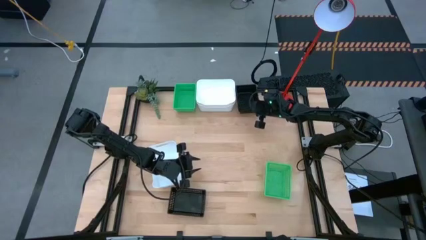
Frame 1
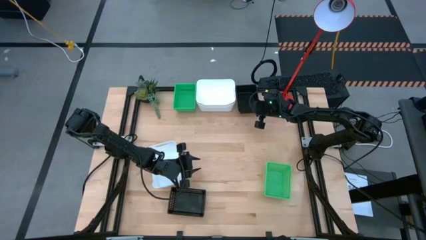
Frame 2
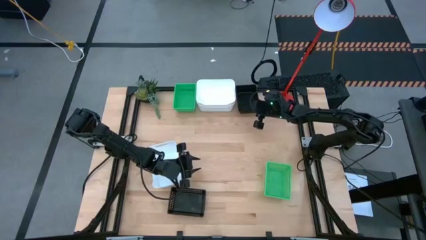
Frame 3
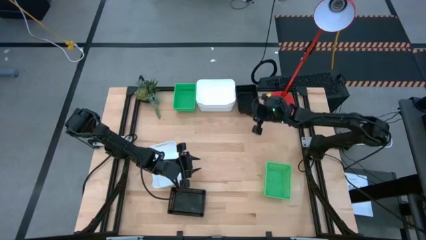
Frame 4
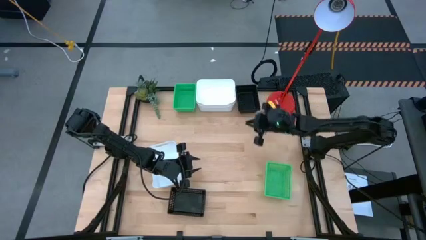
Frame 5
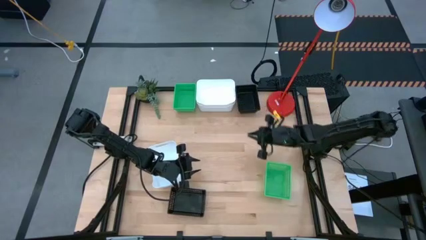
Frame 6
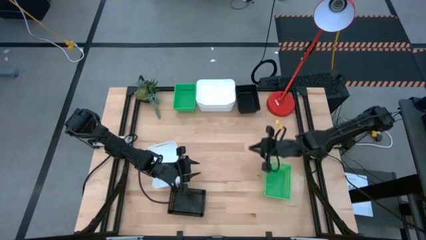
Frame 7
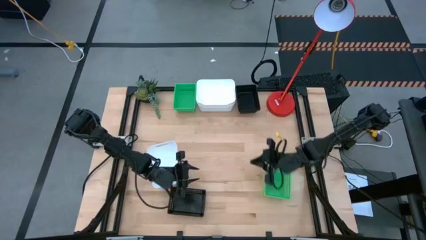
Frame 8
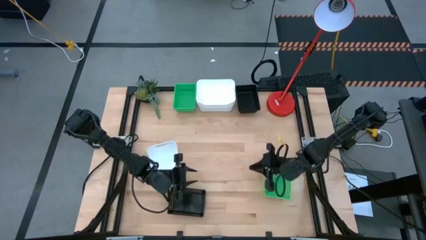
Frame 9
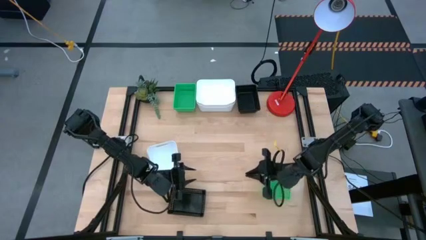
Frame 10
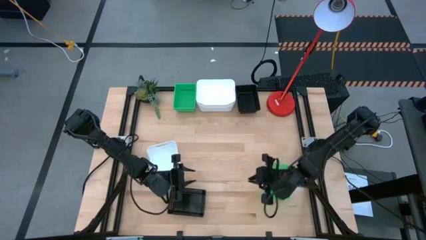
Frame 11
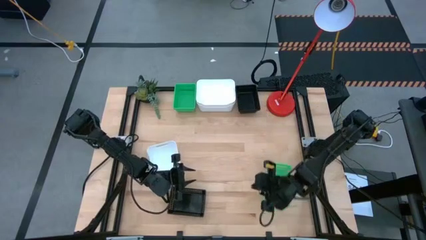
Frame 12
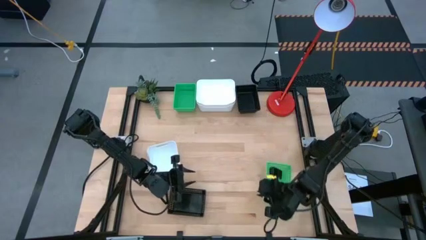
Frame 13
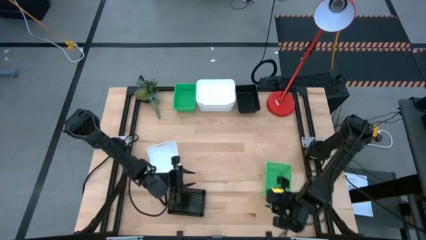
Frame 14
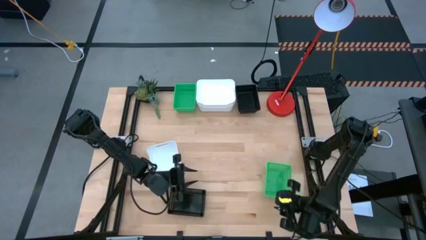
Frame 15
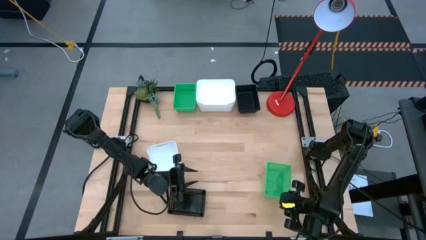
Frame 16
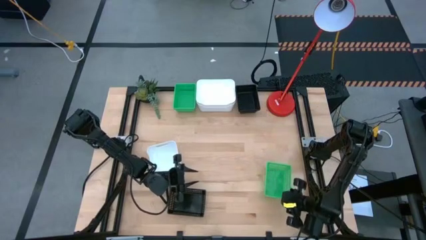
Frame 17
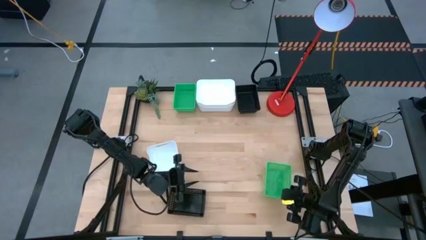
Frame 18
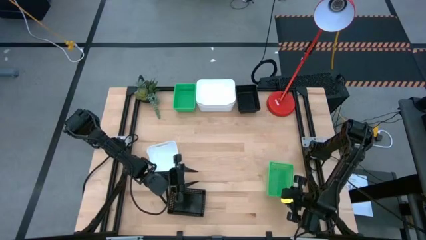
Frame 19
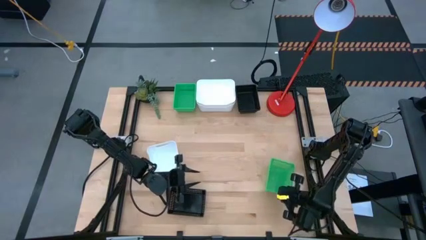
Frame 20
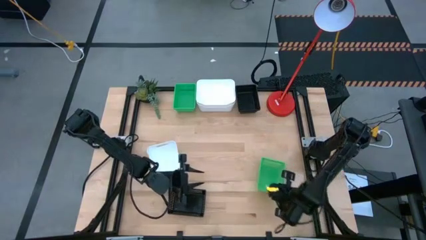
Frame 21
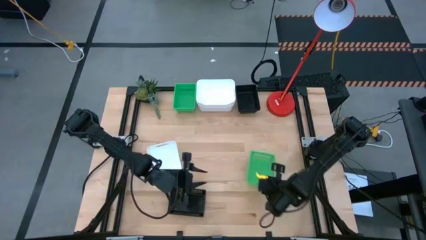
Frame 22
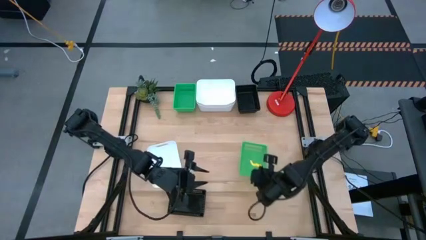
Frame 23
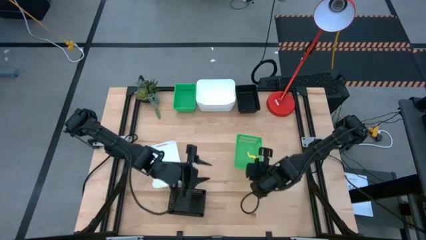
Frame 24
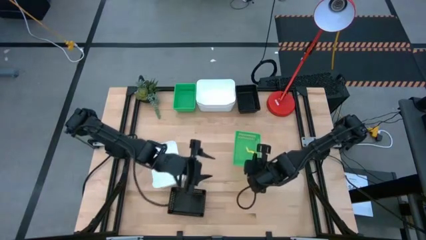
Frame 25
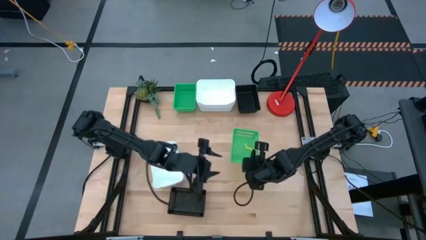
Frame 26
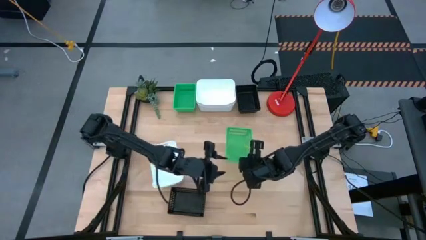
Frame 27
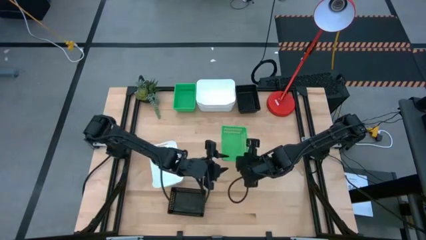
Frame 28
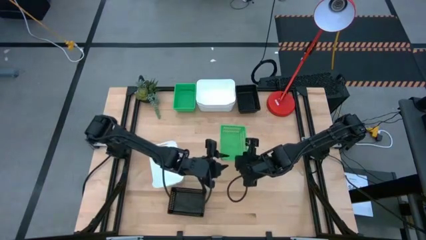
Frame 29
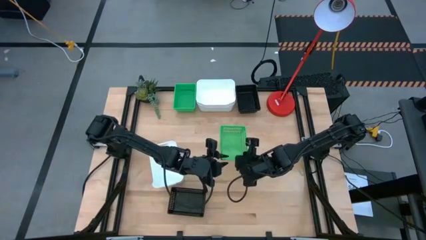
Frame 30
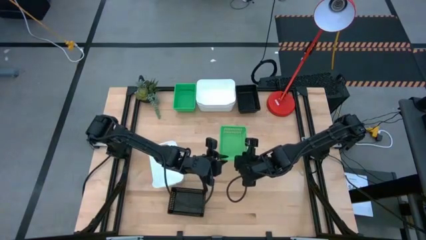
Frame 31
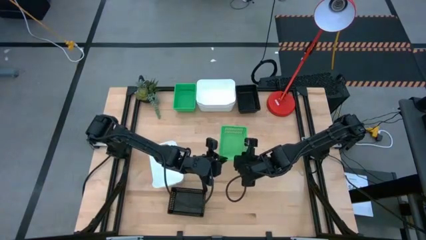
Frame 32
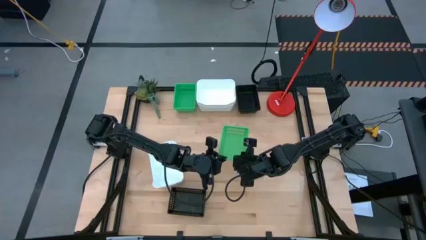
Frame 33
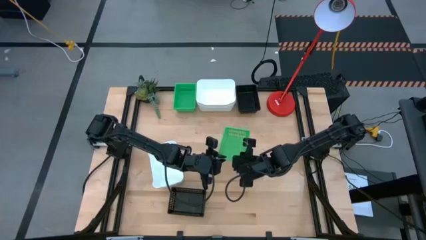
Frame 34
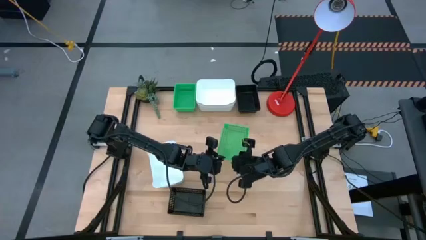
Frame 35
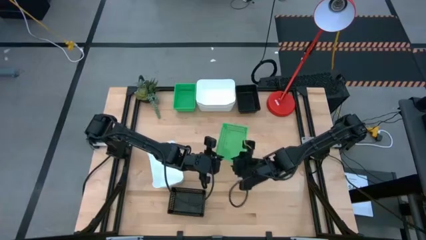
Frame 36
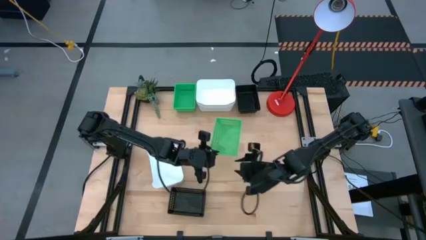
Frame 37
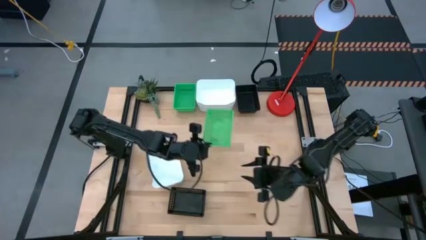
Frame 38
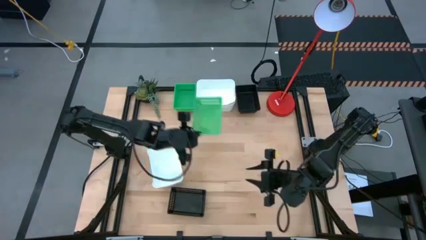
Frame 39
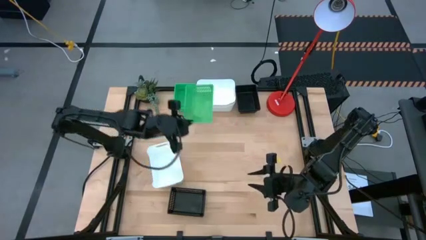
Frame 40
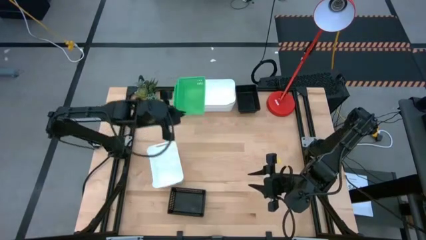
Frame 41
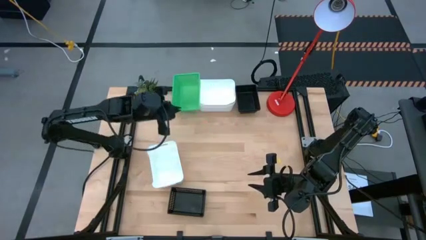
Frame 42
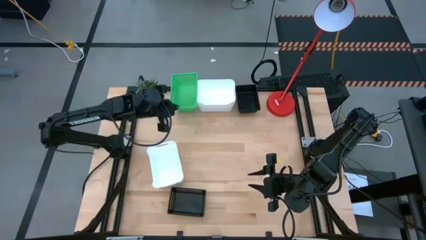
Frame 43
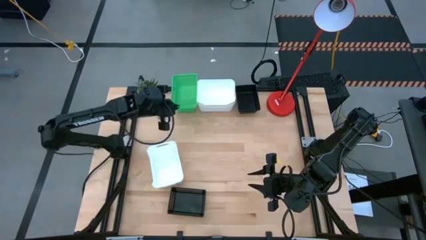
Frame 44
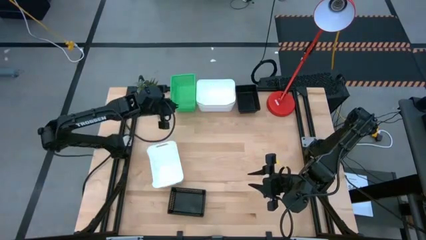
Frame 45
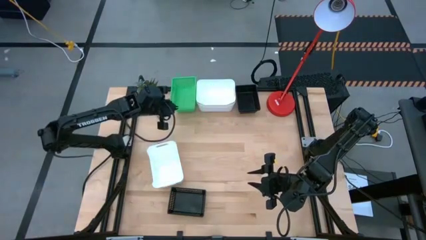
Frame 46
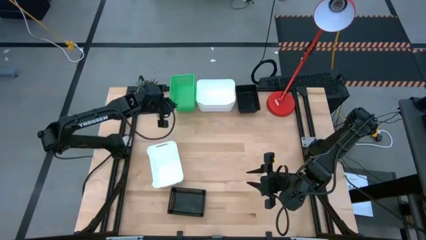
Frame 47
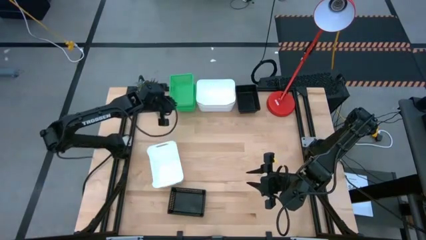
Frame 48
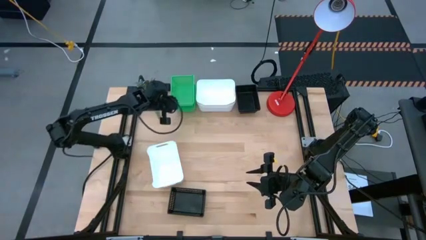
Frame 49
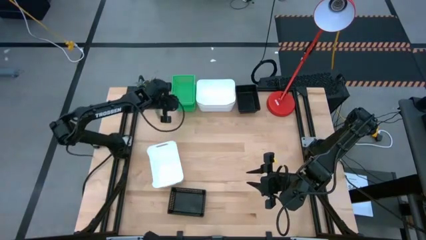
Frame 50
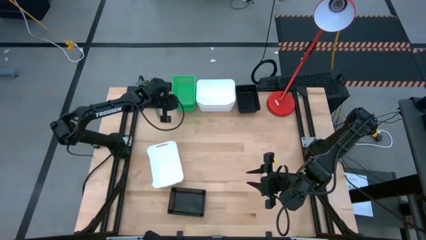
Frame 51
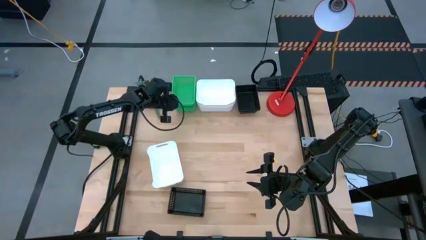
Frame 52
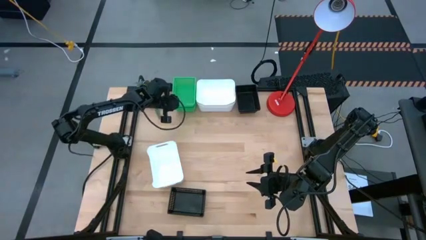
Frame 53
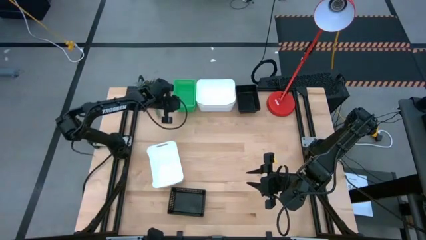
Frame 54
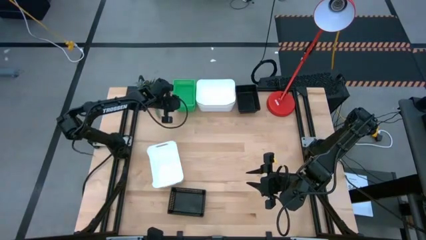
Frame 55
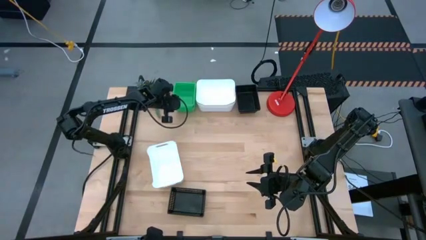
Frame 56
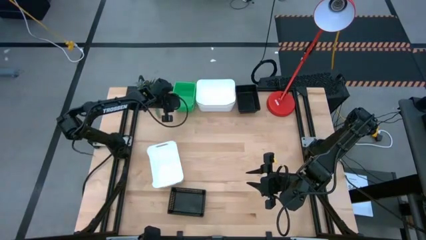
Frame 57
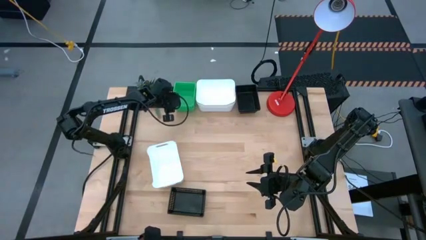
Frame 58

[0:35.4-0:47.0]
Stack the bottom green bin on the top stacked green bins

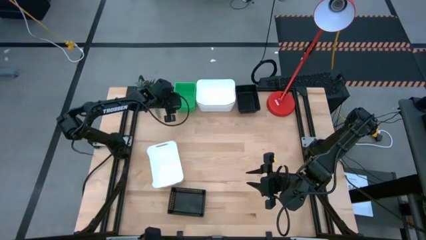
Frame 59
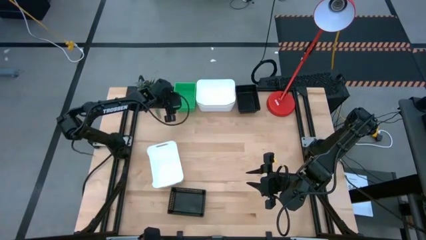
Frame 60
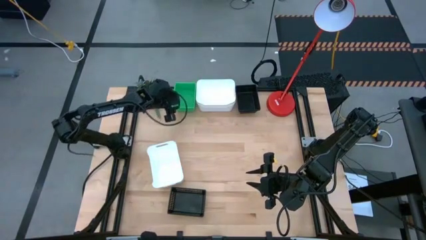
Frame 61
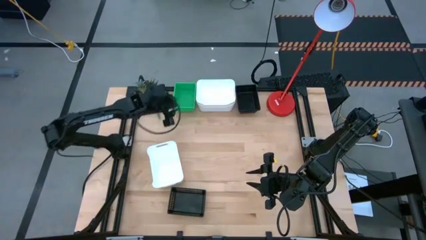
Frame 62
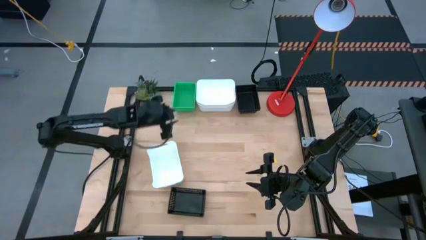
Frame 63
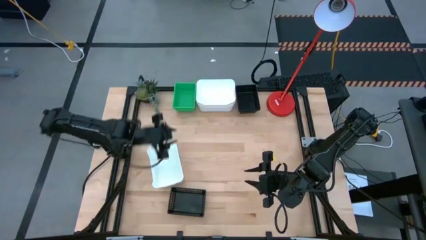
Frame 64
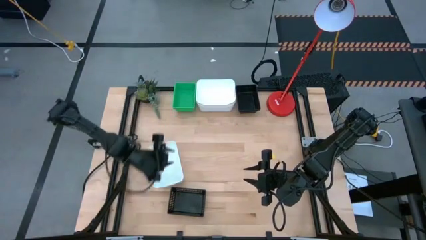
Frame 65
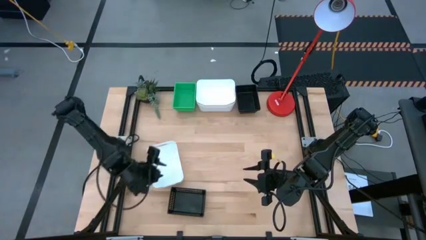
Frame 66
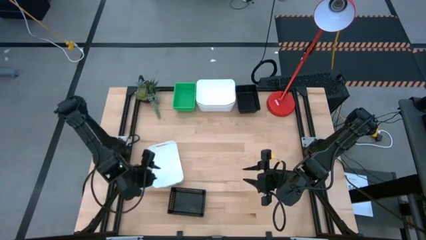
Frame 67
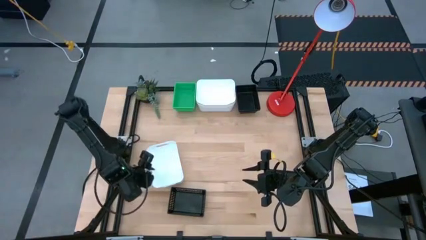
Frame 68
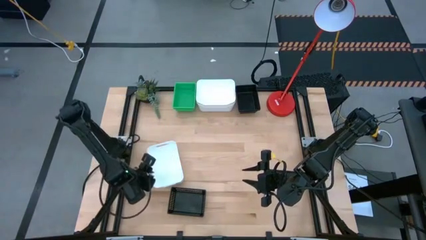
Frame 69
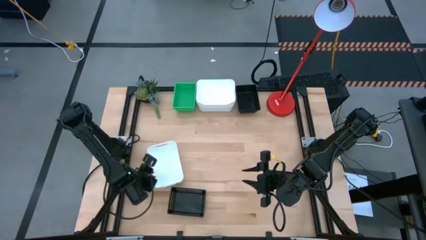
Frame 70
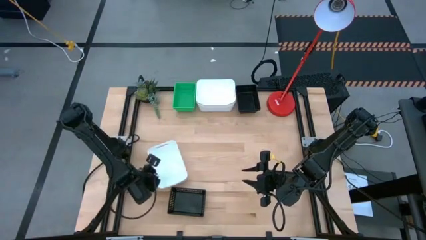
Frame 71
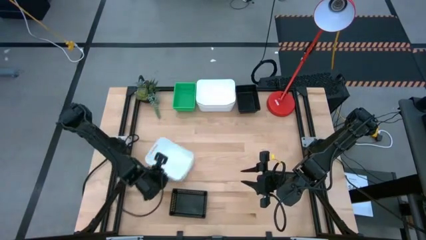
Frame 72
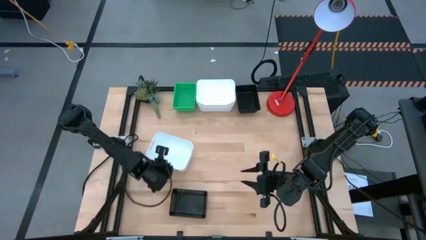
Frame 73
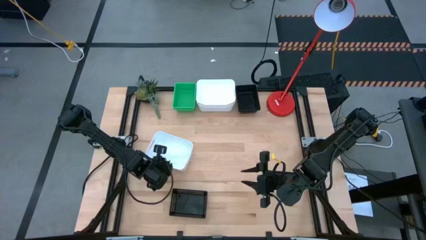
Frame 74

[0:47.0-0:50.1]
Stack the bottom white bin on the stacked white bins
